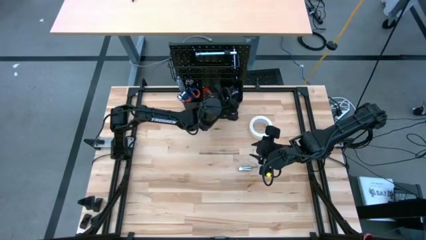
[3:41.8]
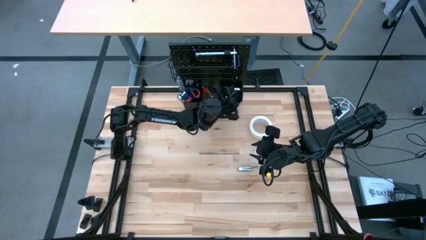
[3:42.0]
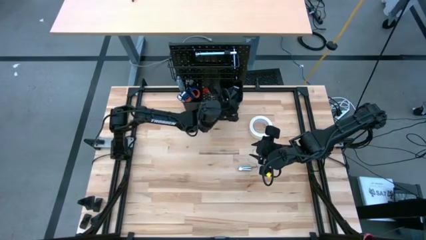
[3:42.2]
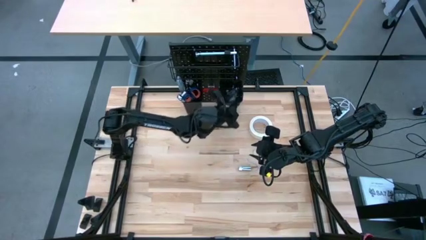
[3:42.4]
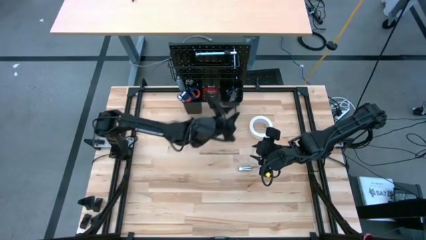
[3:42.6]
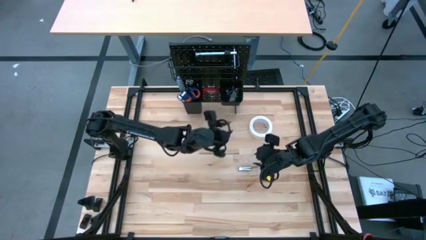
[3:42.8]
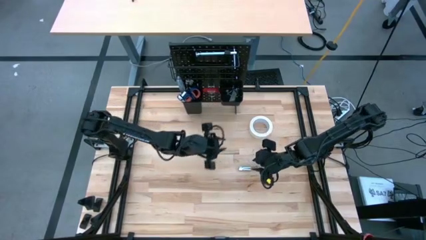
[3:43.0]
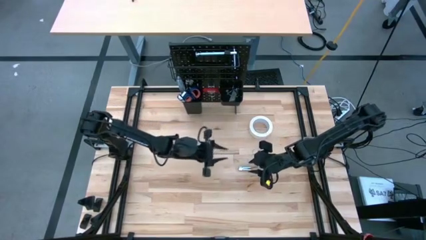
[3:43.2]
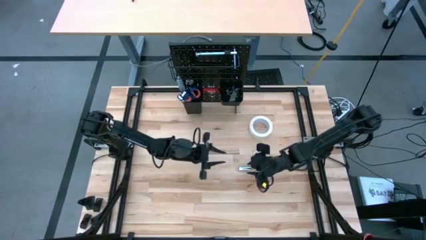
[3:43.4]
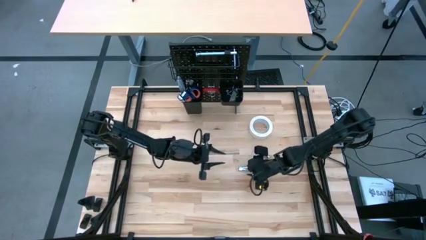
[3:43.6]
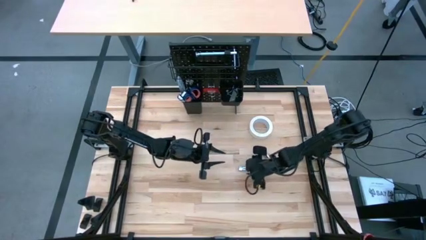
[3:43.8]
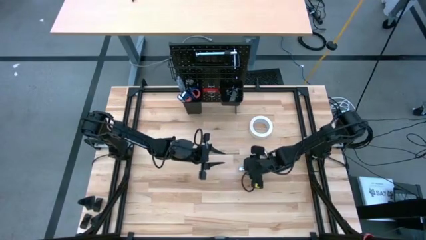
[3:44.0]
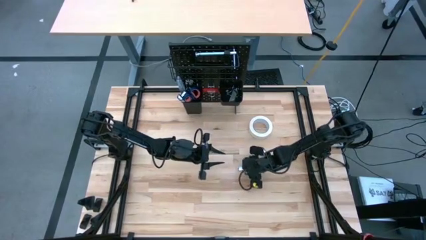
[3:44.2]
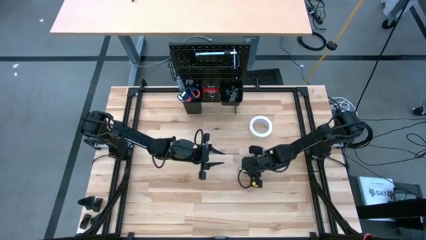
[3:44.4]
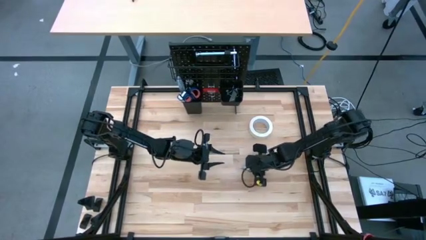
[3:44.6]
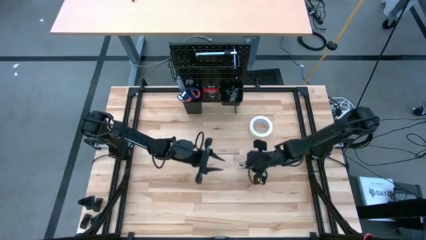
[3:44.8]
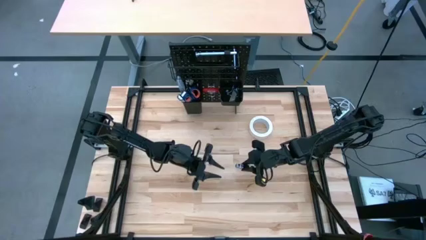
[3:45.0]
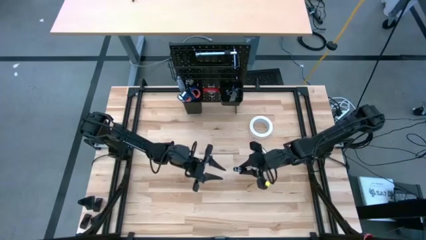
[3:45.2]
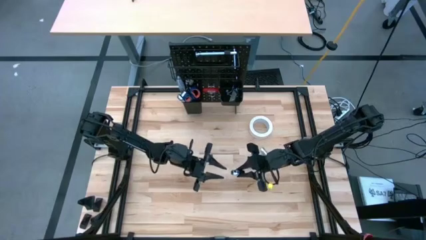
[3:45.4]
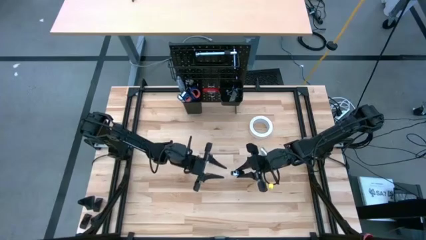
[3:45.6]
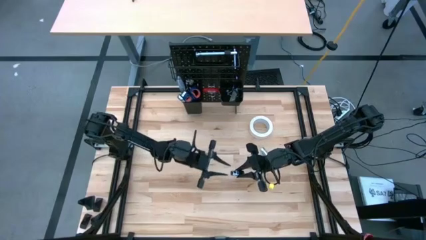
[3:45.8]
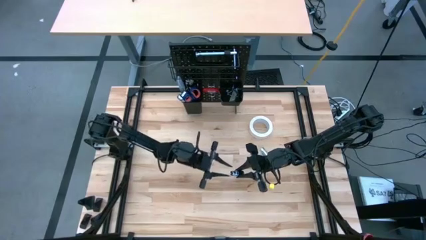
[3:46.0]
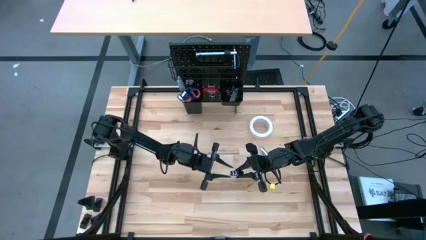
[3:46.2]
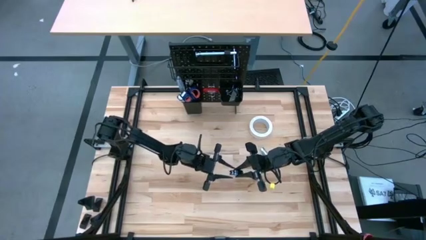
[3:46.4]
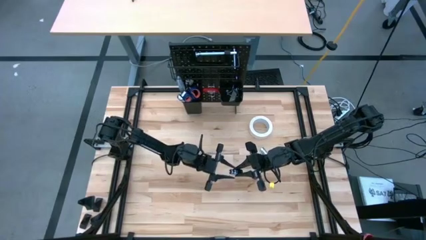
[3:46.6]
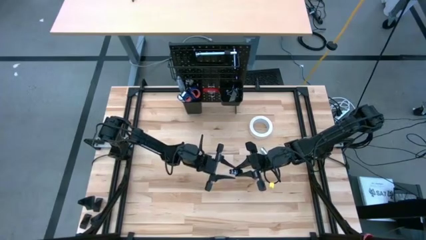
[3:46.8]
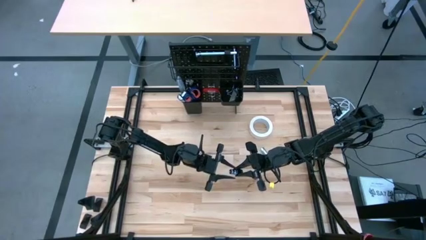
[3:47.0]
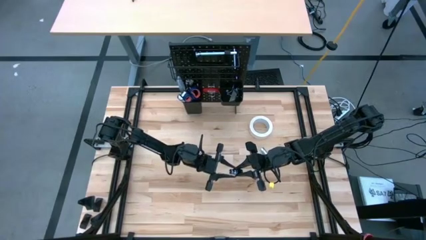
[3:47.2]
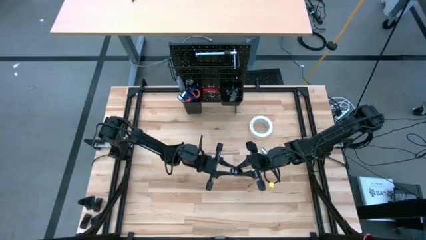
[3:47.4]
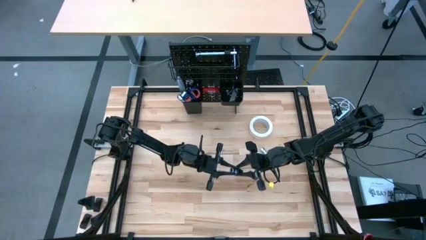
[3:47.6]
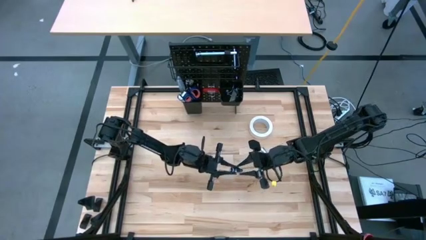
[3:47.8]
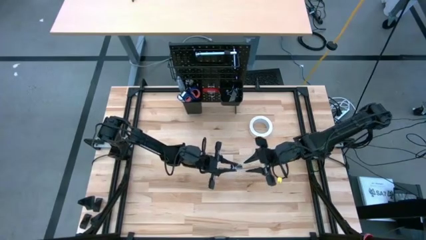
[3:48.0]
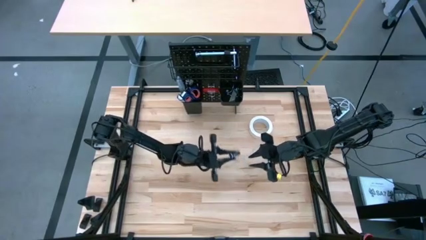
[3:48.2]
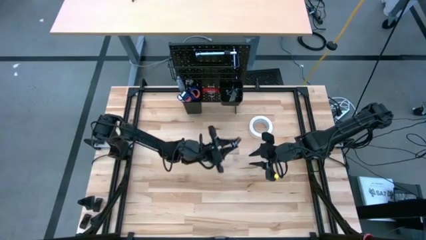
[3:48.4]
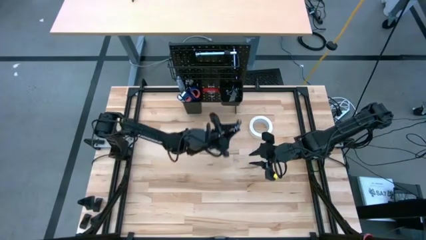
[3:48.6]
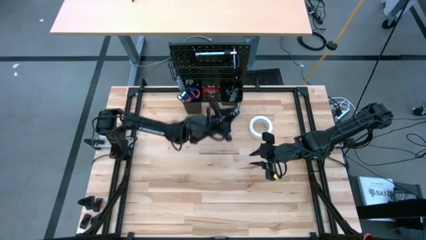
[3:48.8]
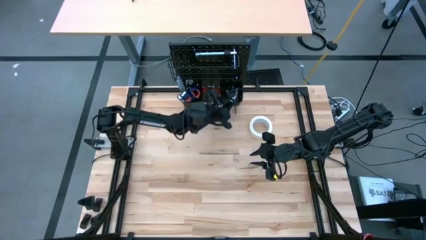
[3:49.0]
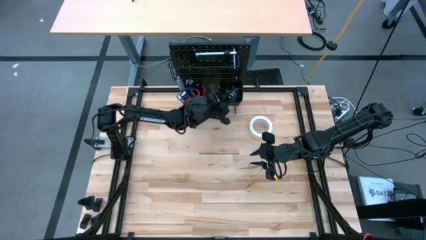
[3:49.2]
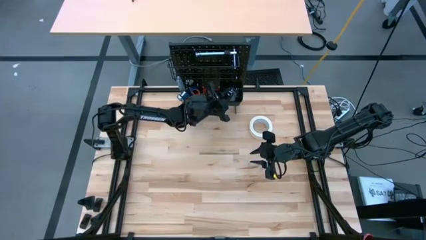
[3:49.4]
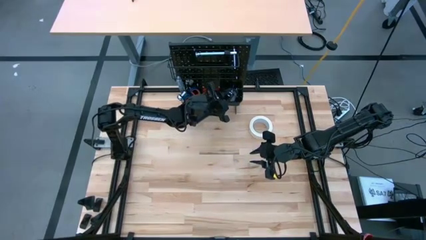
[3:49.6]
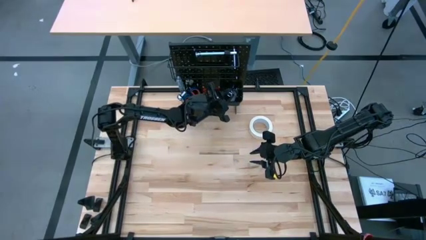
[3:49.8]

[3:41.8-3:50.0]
Task: Hang tools onto peg board
Put the bottom socket into the right black bin on the peg board

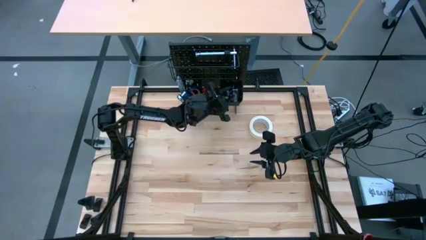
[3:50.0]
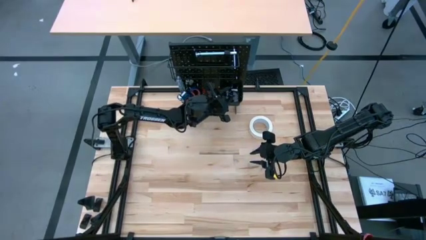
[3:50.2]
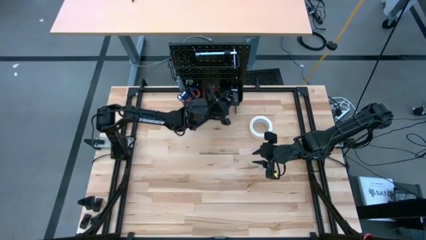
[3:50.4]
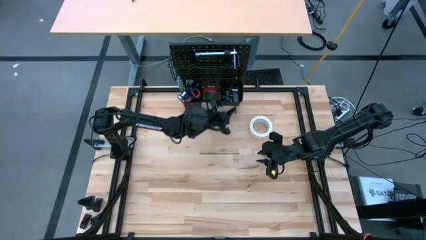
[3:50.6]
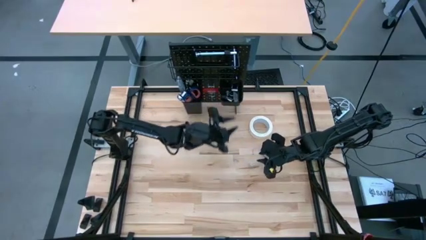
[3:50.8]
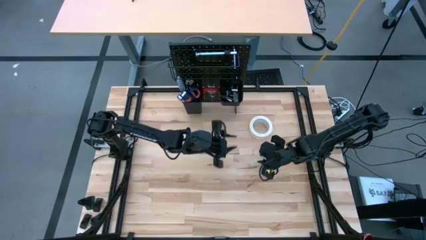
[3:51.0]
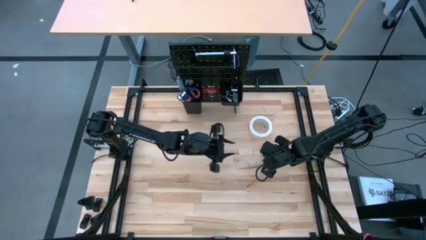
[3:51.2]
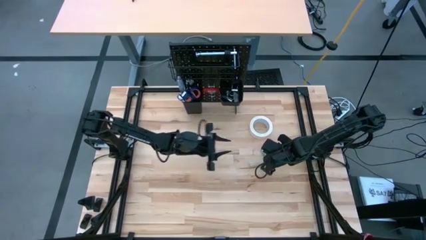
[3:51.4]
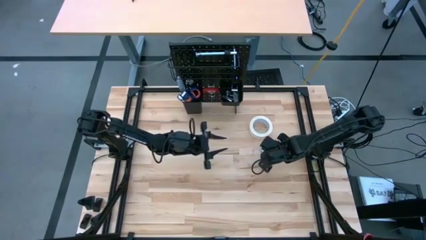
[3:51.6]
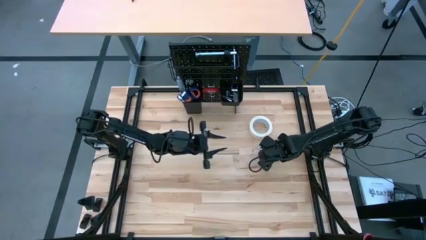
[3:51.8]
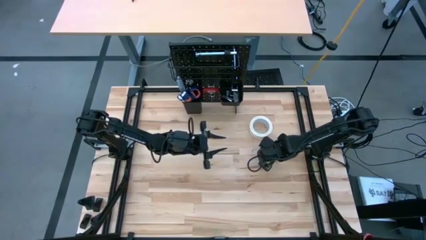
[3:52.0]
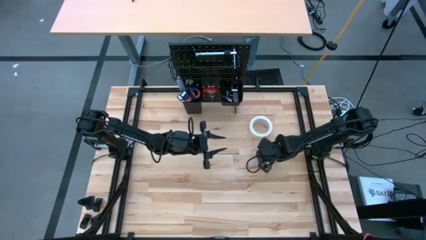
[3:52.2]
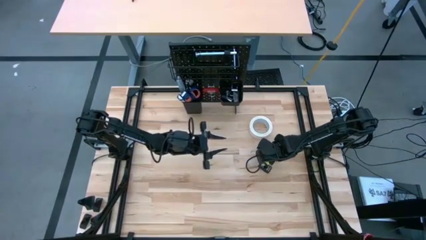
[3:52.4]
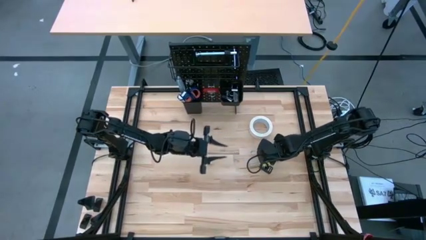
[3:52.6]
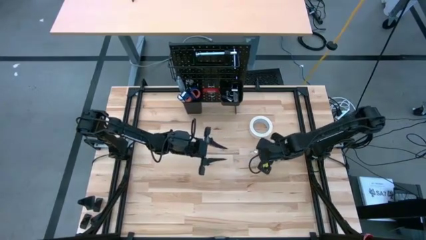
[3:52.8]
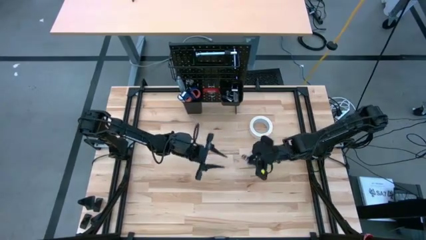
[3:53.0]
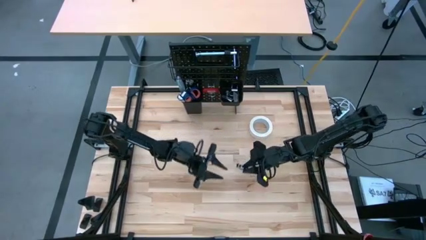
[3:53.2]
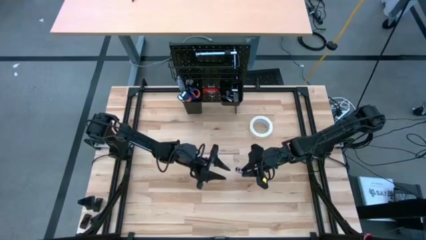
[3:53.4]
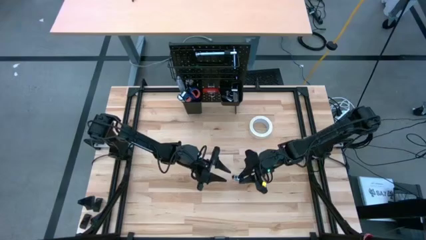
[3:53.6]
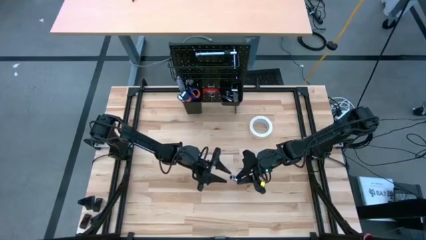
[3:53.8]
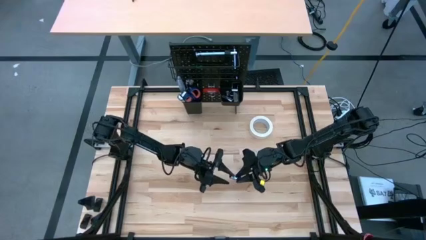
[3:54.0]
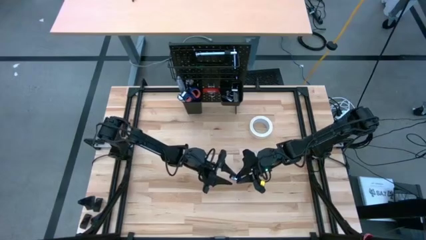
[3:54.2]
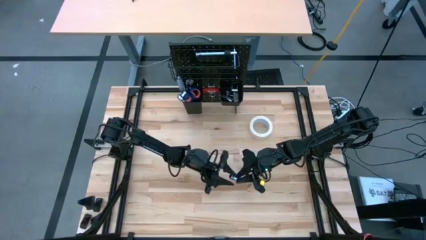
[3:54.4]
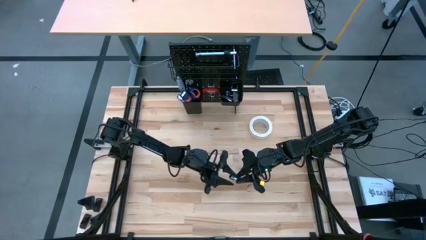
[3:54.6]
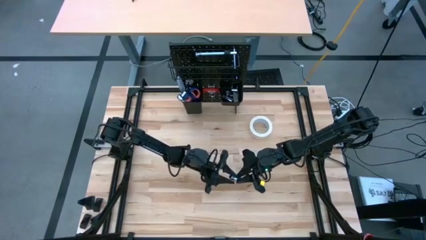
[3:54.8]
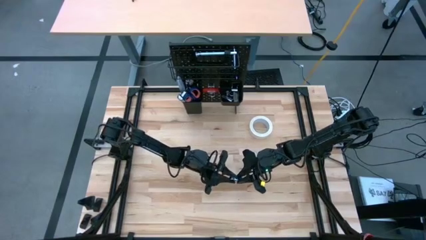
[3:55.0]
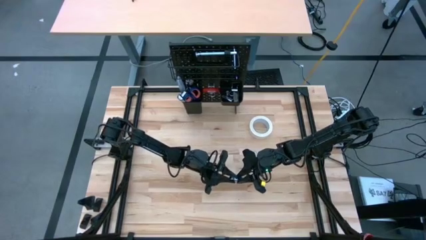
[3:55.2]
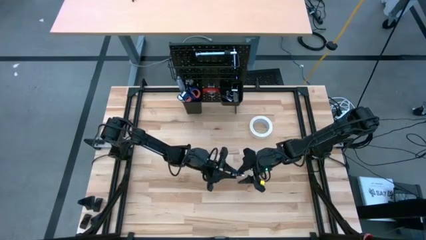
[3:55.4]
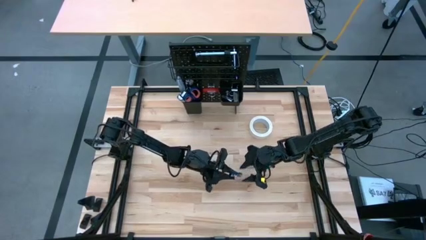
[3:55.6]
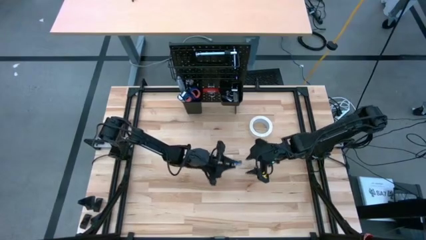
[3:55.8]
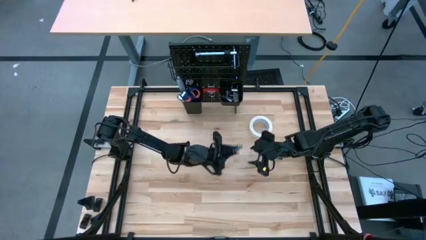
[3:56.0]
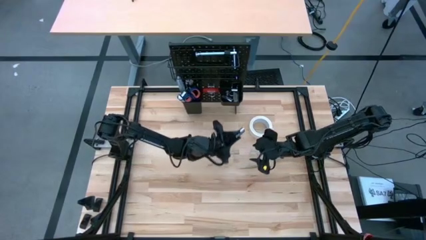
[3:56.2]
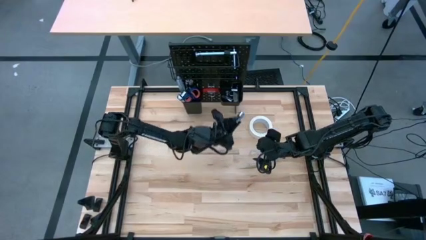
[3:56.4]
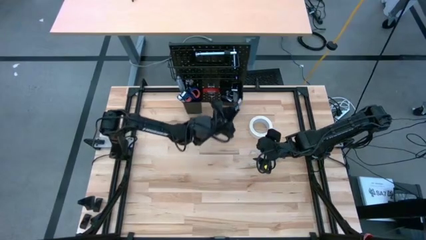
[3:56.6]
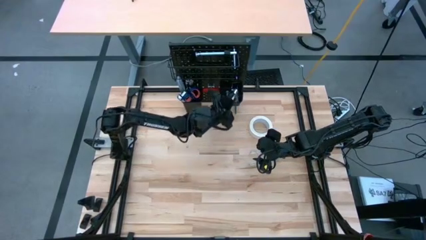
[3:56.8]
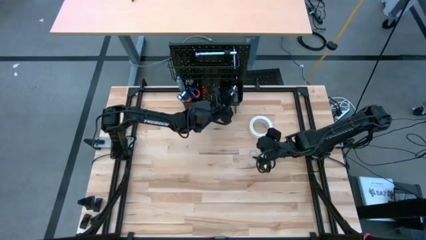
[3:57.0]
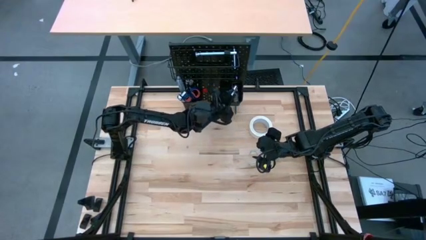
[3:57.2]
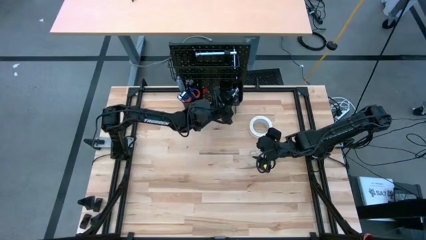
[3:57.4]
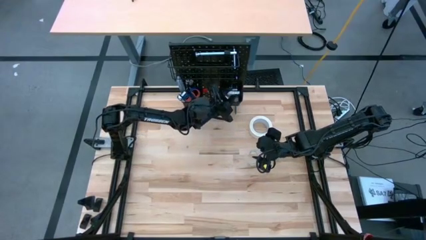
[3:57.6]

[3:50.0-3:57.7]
Put the socket into the right black bin on the peg board
